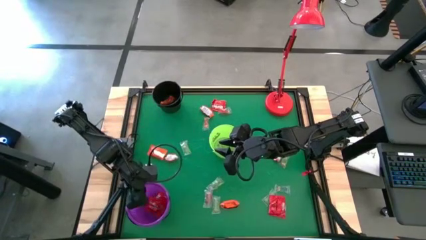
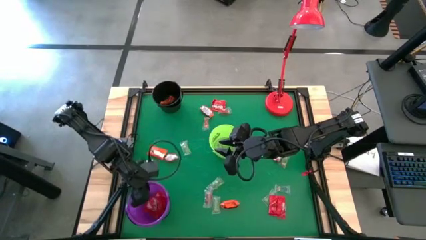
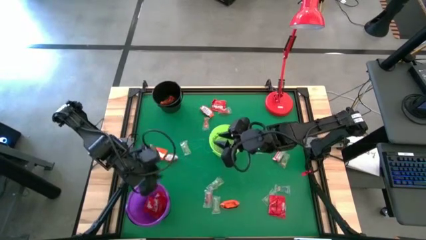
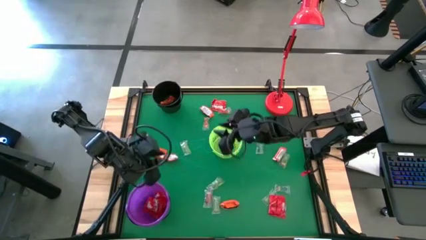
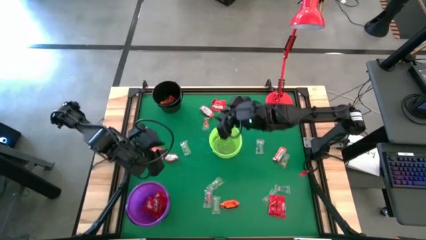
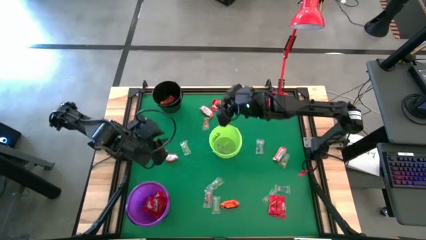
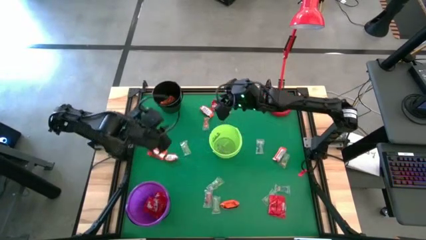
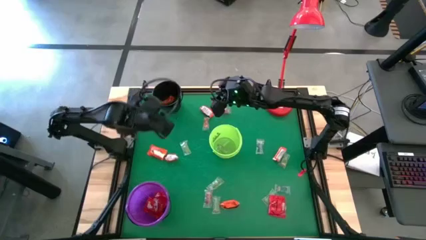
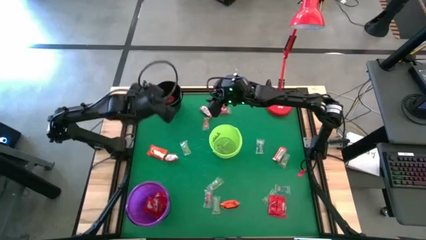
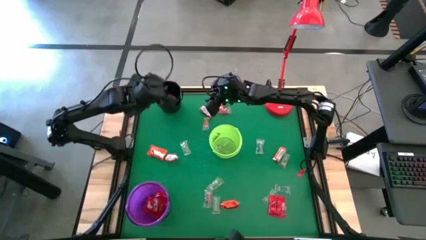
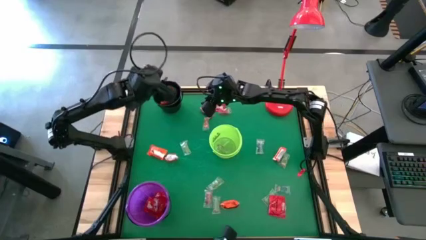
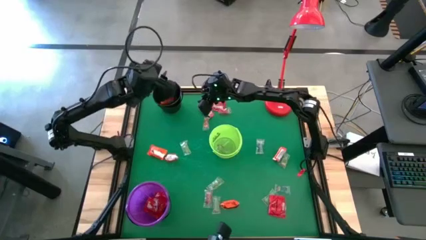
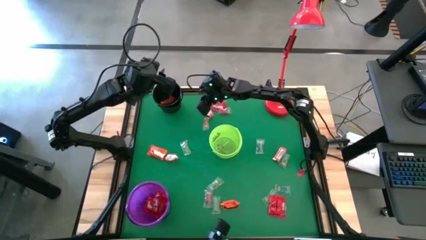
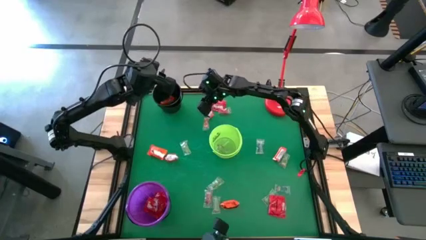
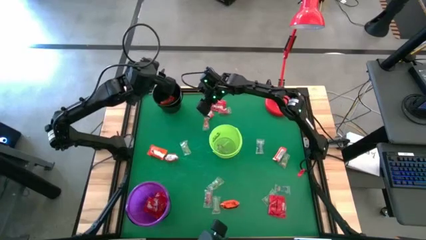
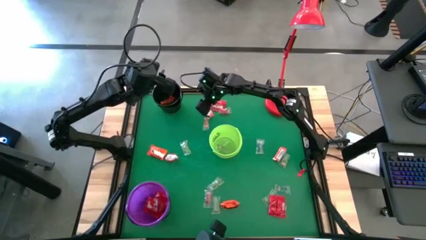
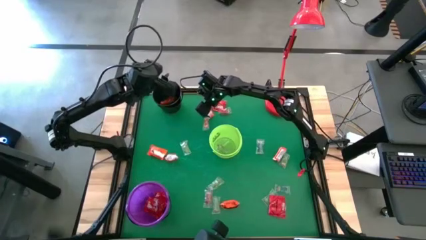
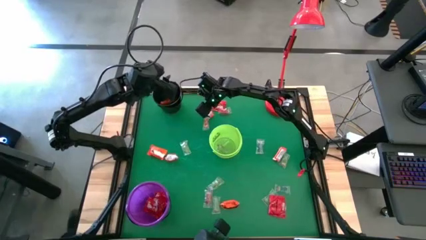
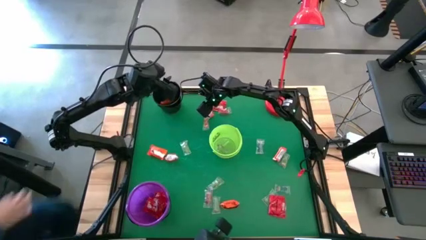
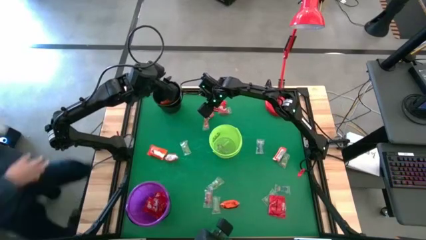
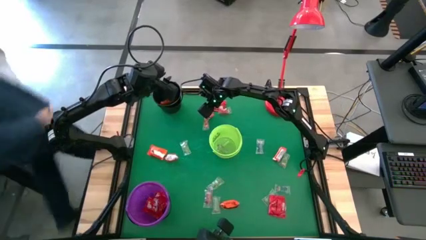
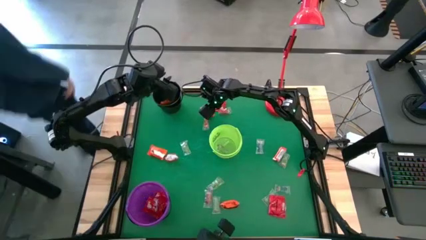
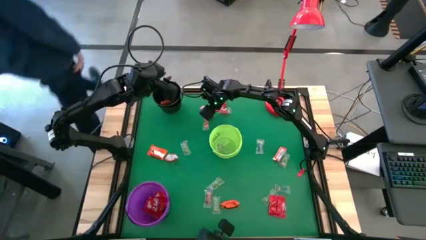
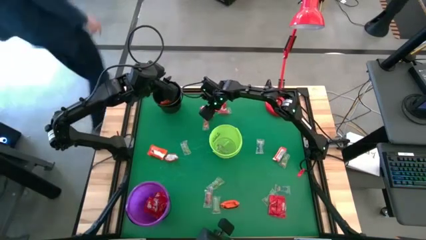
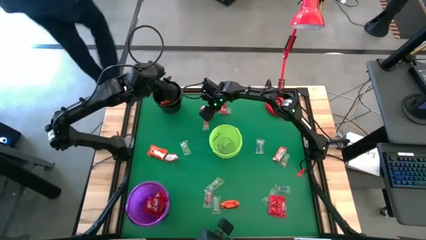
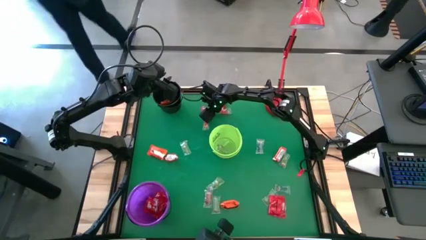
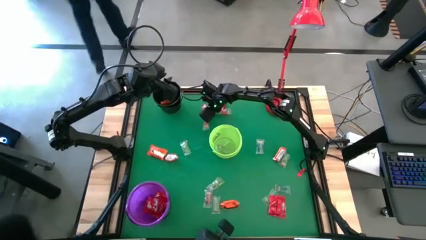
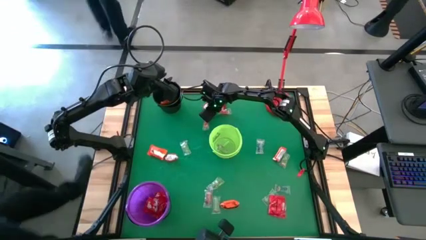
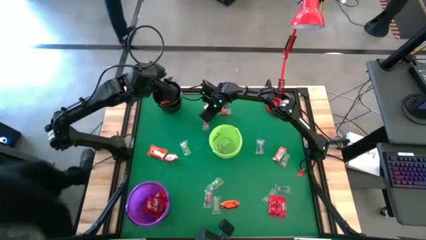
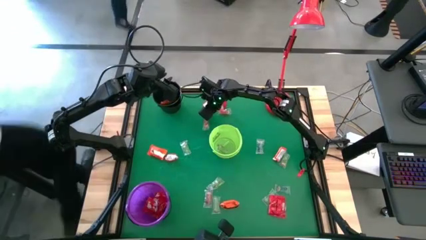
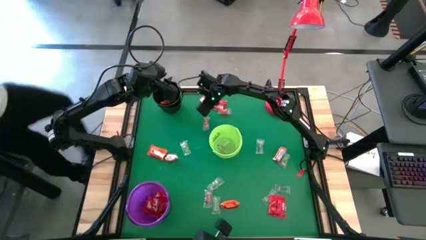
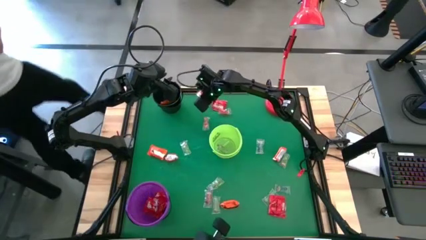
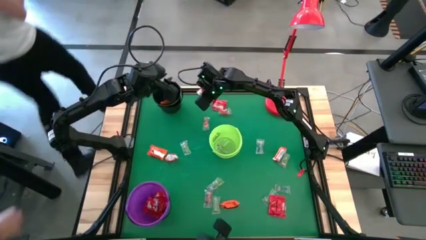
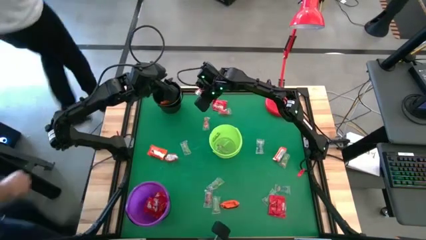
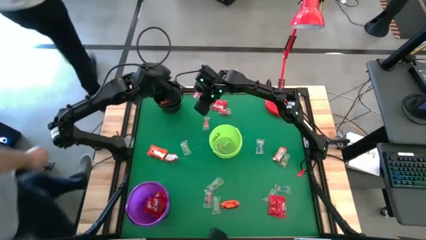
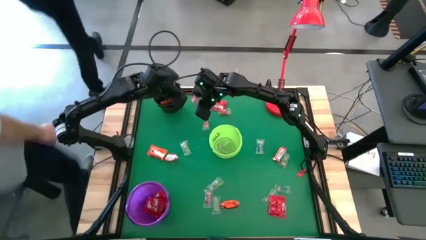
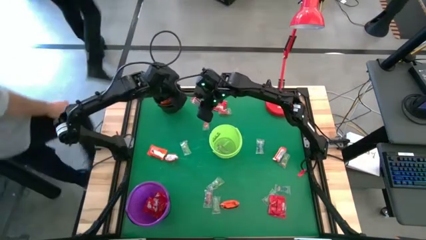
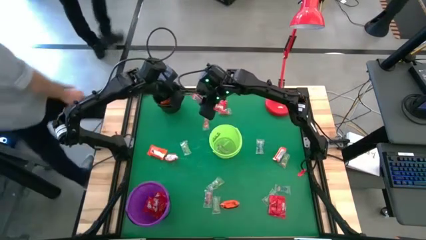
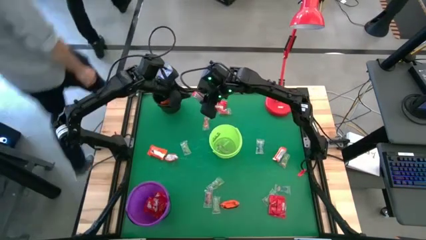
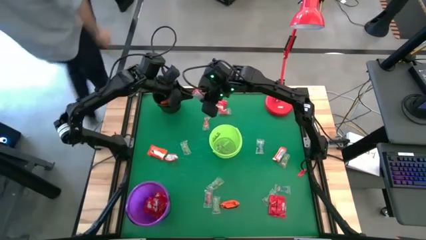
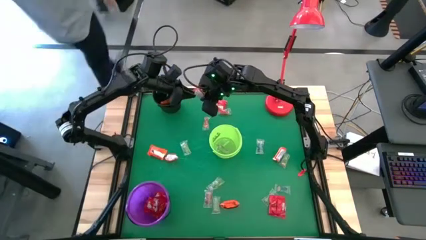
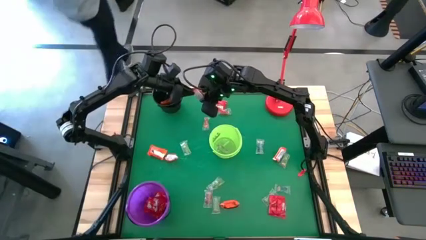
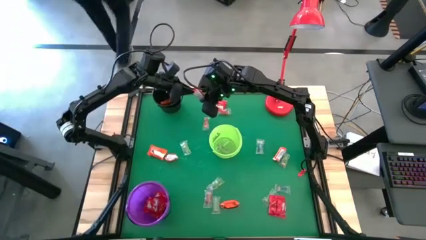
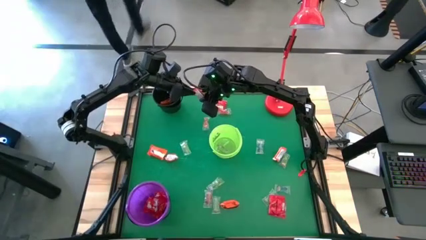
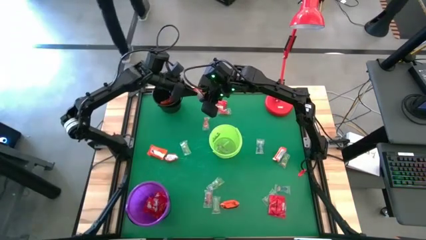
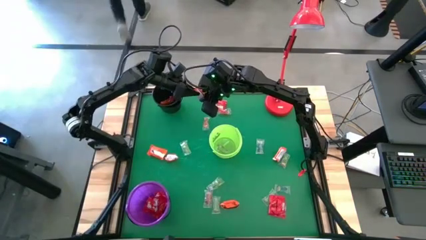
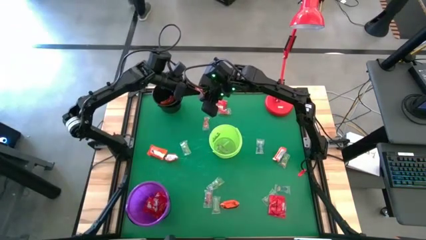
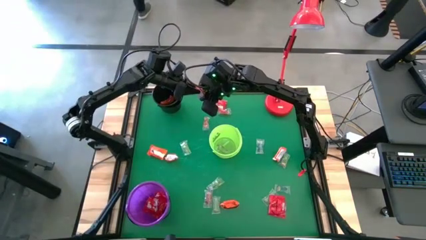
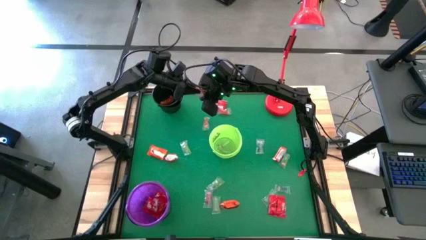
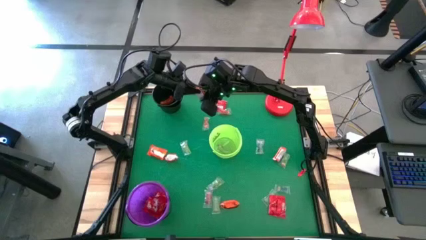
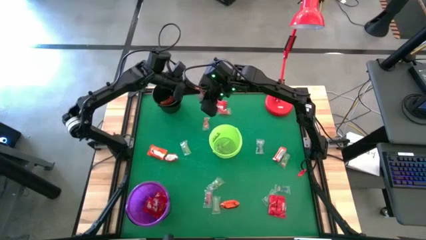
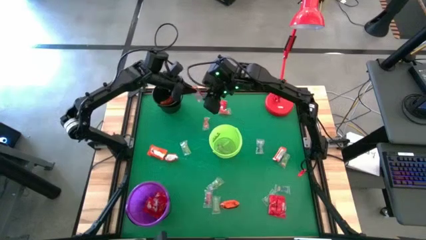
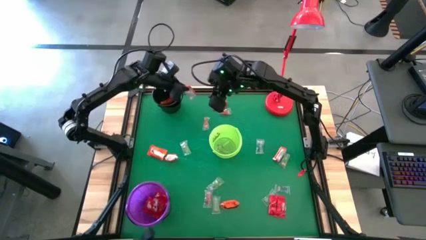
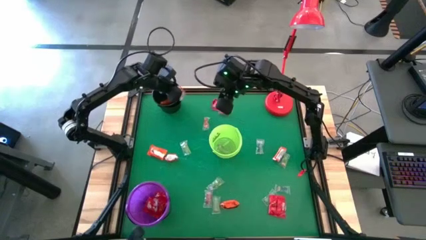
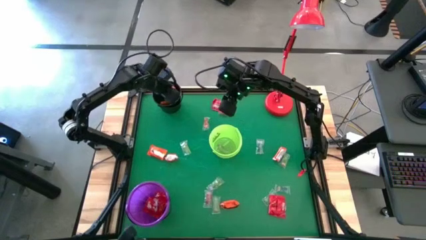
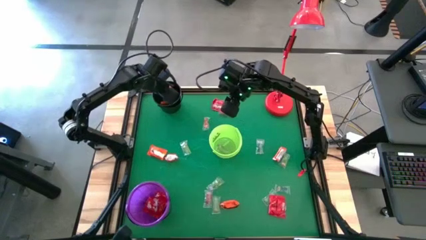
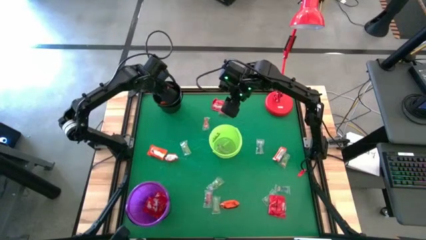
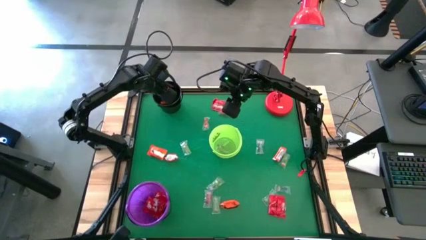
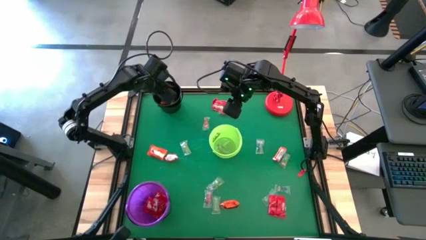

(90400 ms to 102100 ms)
Task: Sort candy
Put the orange chocolate into the black bucket

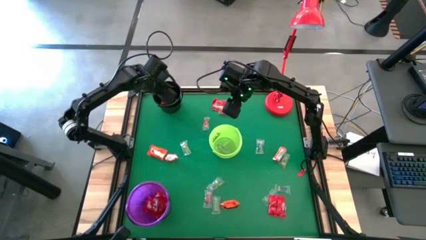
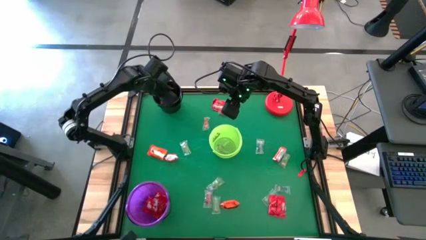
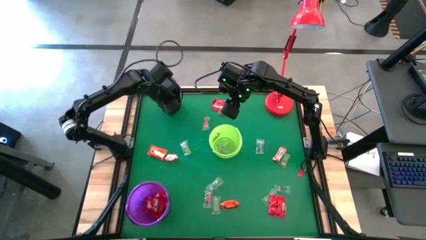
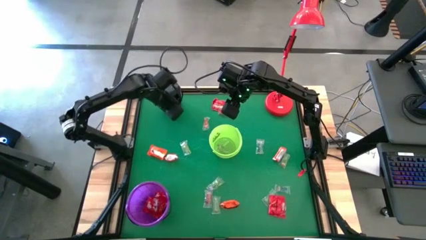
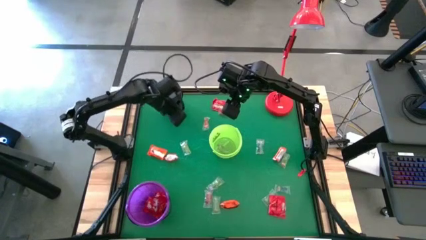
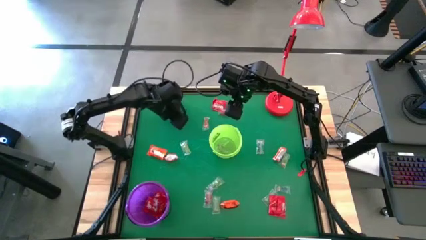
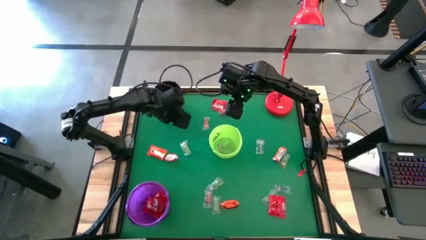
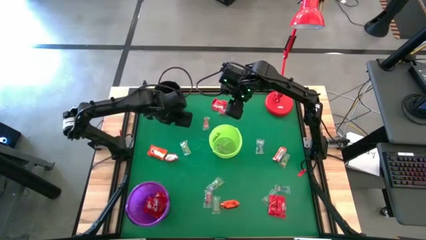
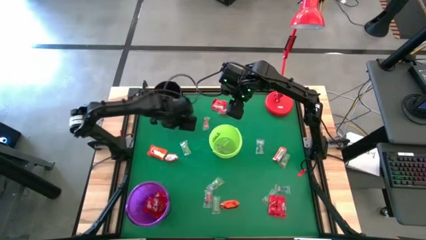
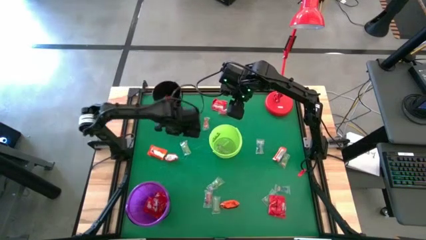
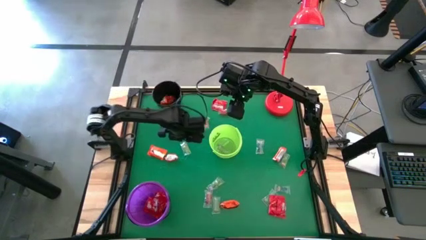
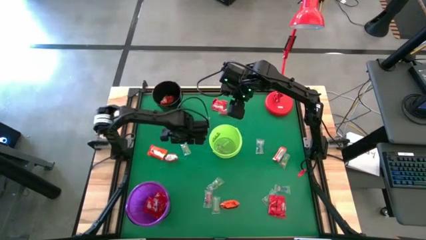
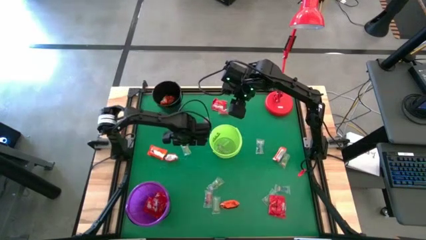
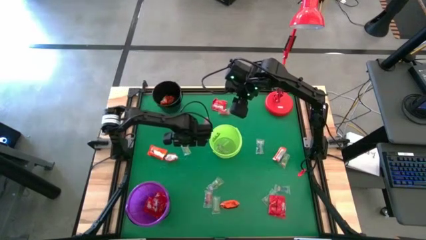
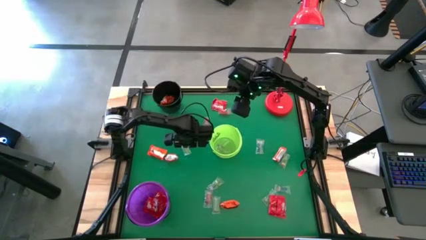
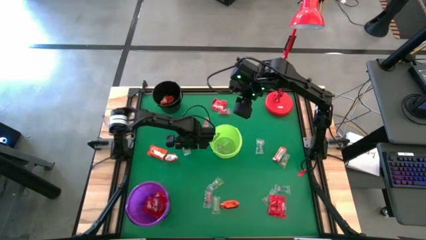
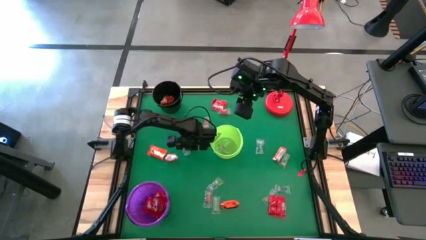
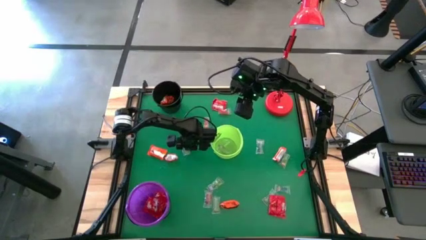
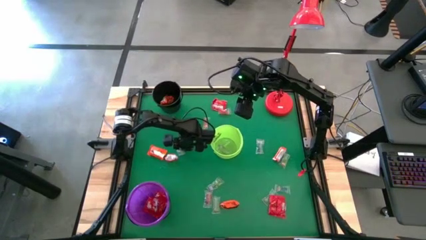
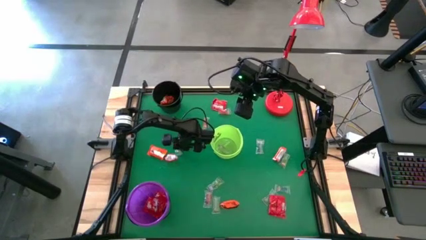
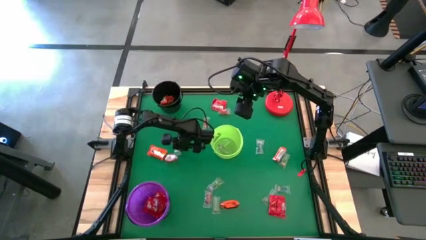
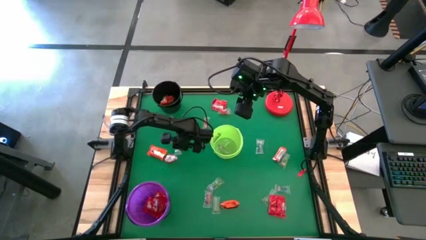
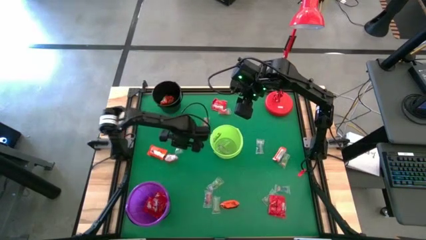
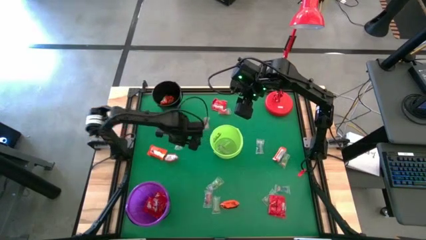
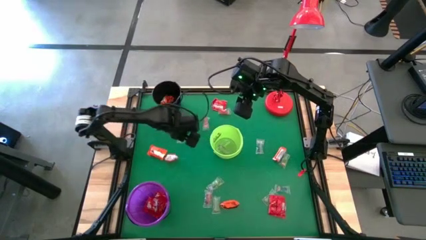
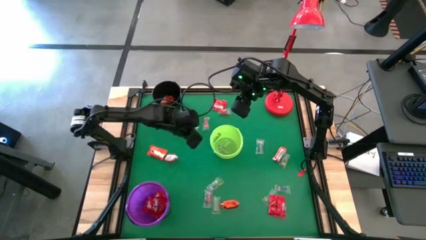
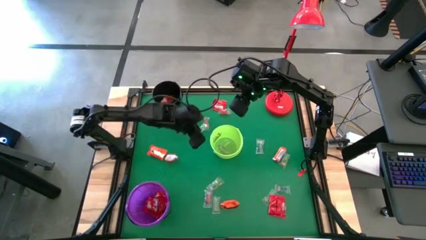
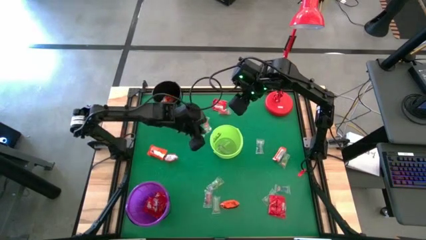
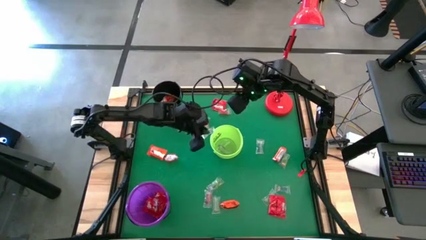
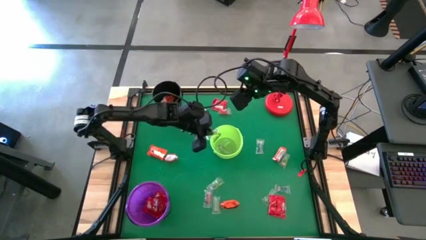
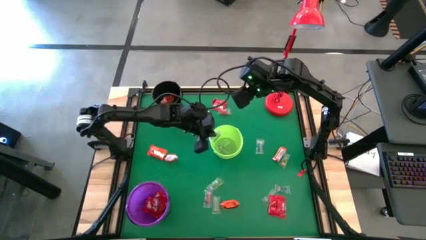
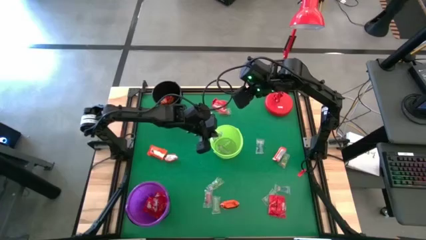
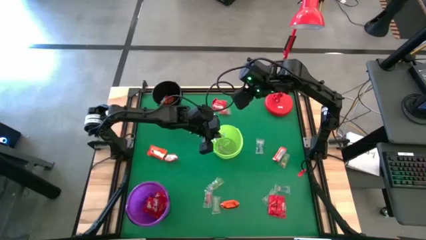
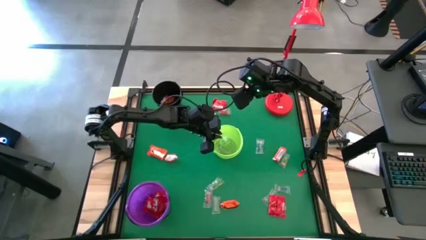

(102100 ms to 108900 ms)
Put the green gummy into the green bucket
